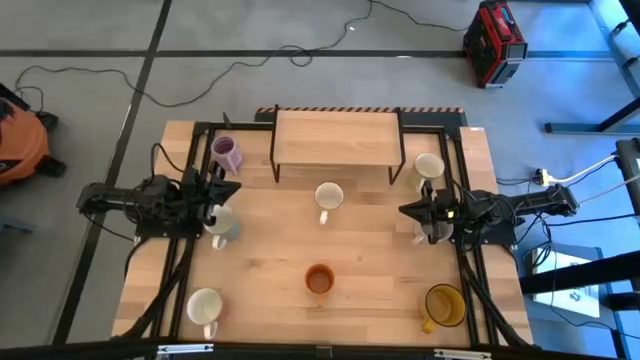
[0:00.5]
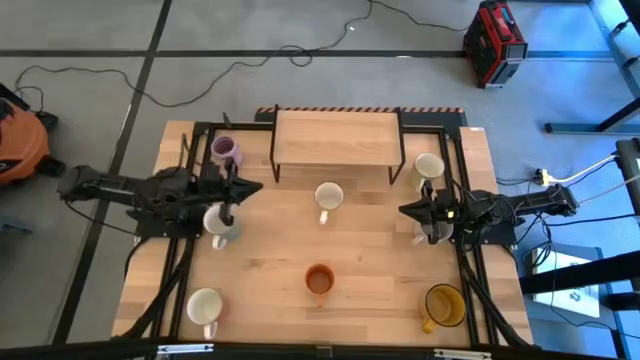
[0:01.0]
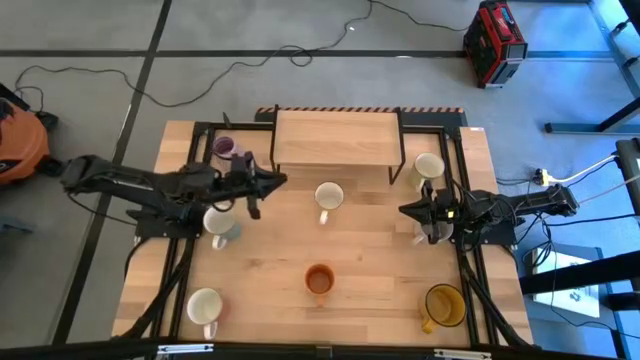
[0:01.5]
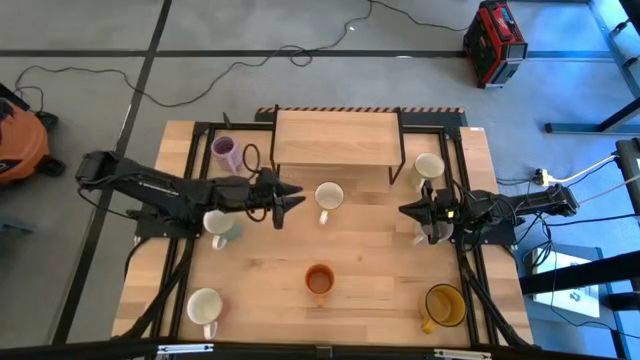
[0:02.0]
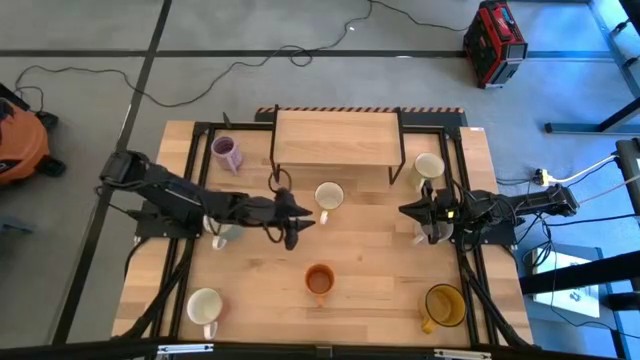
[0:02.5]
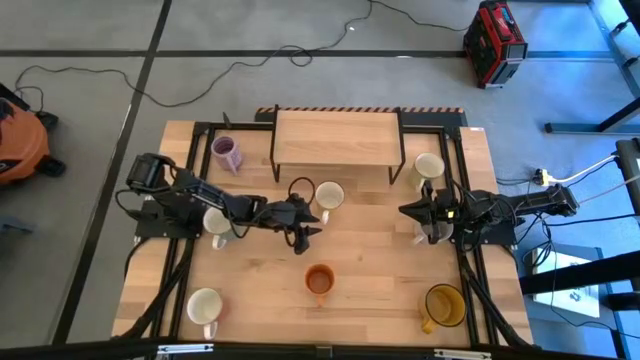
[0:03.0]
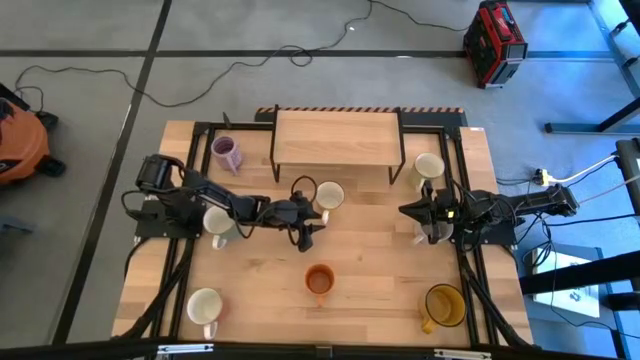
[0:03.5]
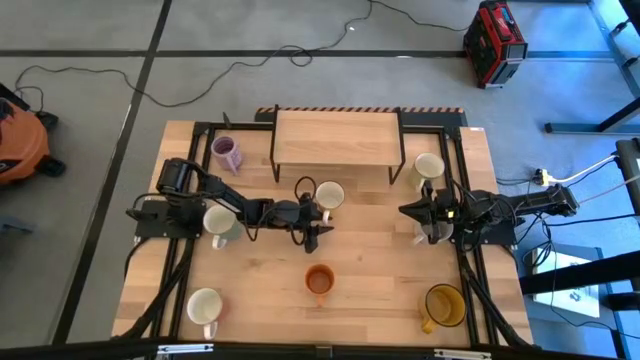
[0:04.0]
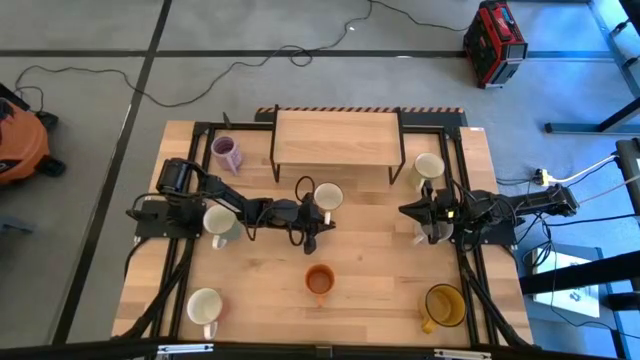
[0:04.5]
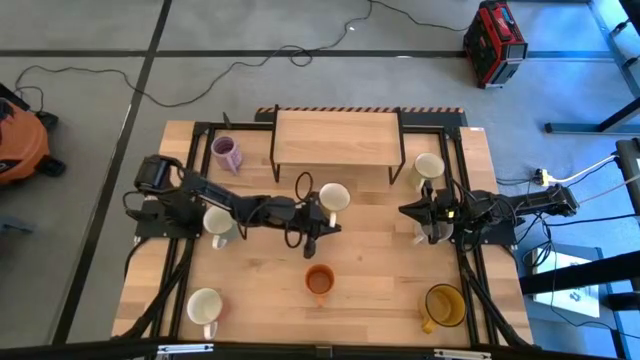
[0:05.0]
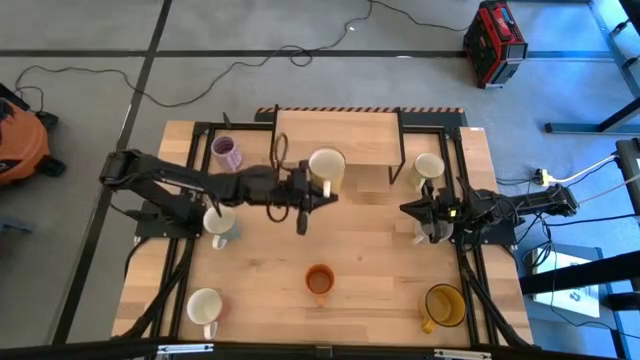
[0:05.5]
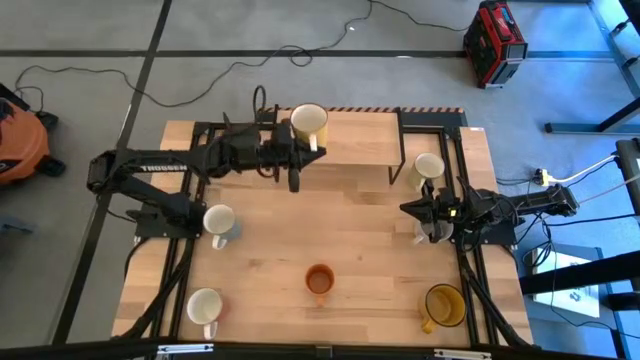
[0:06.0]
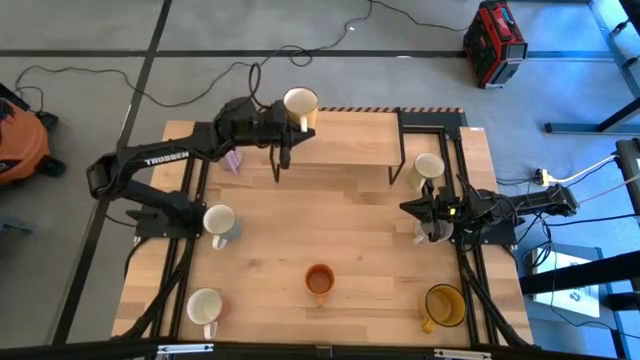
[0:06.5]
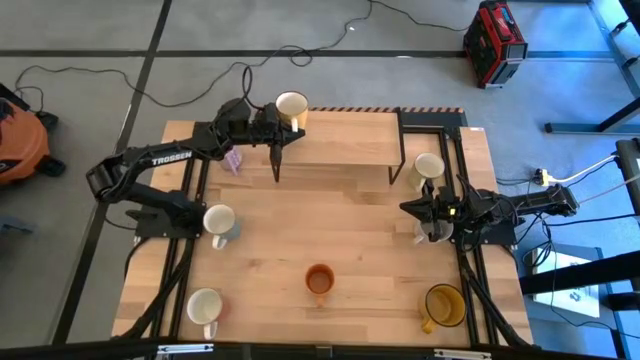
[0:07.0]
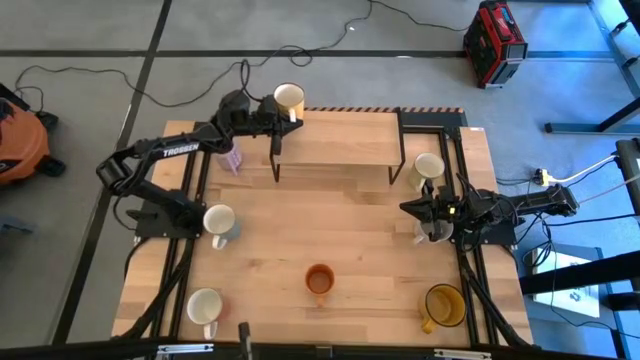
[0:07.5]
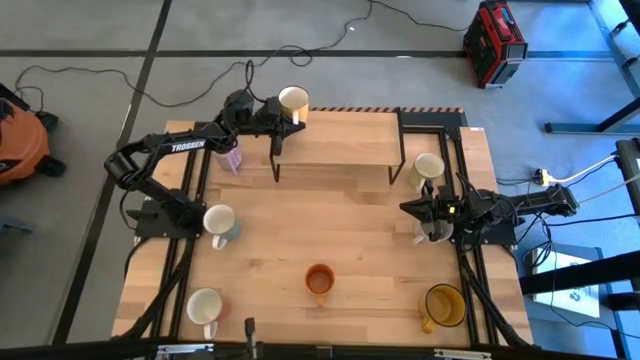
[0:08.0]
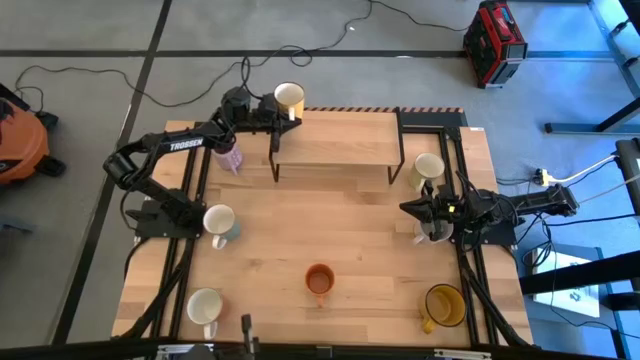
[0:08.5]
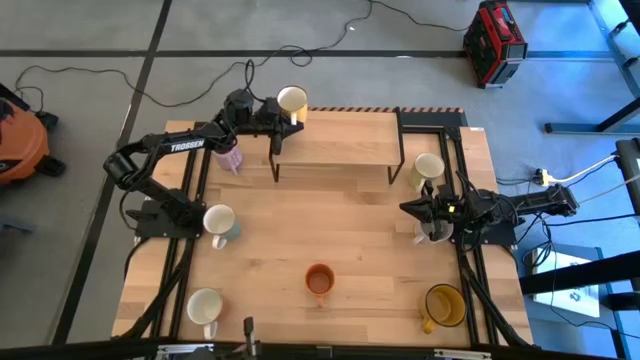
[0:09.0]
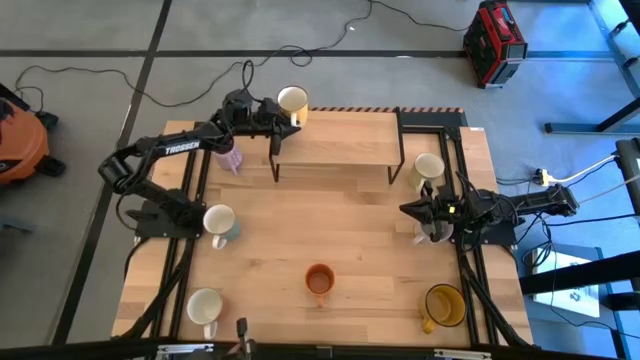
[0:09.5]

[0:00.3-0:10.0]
Task: Place coffee mugs
Put the light yellow mug on the shelf
